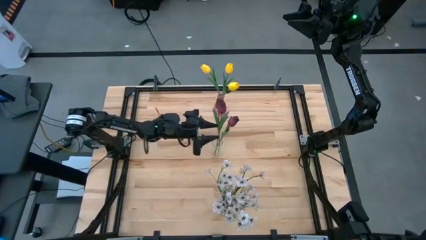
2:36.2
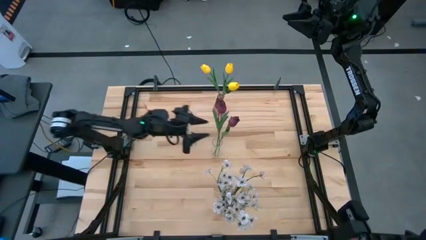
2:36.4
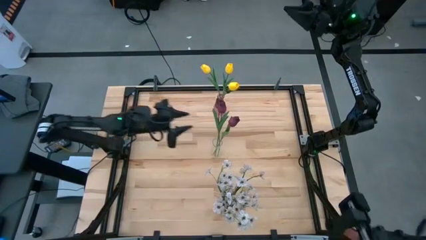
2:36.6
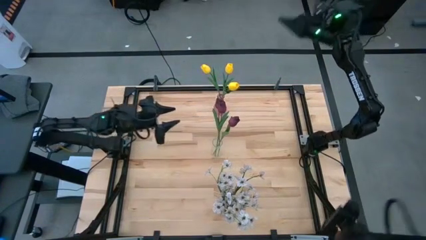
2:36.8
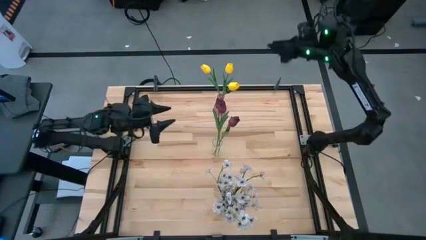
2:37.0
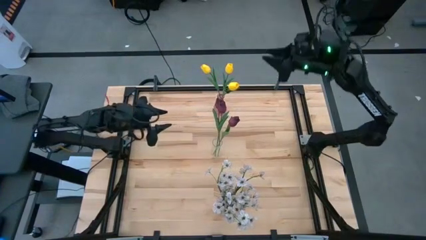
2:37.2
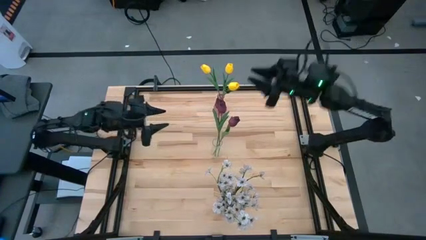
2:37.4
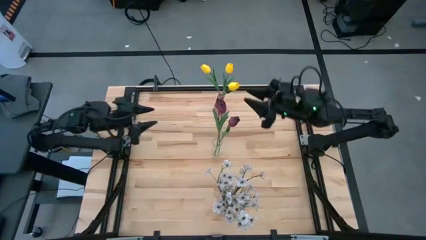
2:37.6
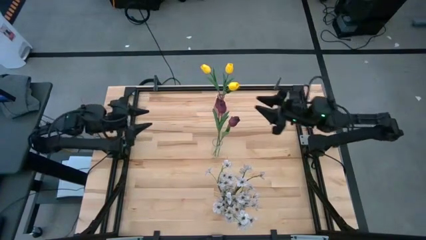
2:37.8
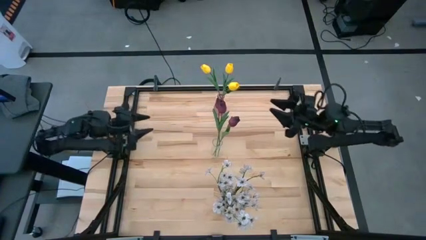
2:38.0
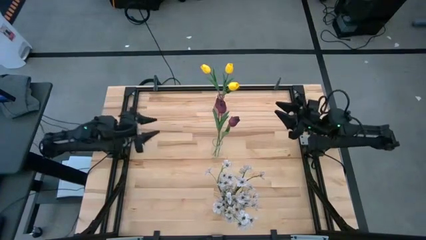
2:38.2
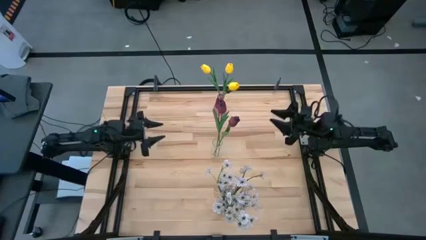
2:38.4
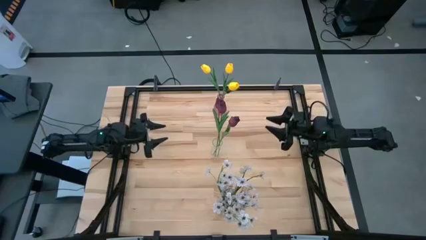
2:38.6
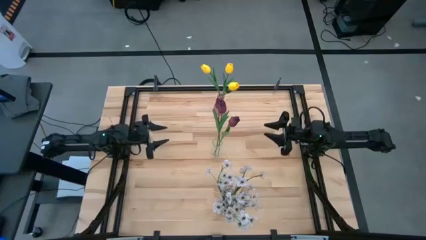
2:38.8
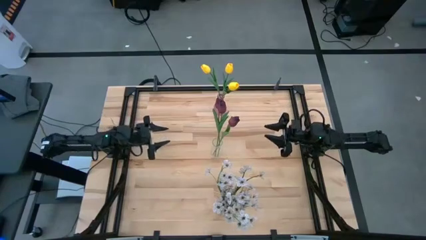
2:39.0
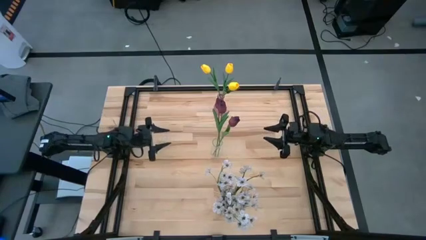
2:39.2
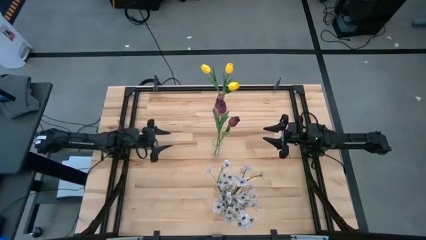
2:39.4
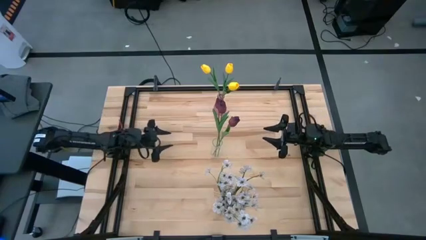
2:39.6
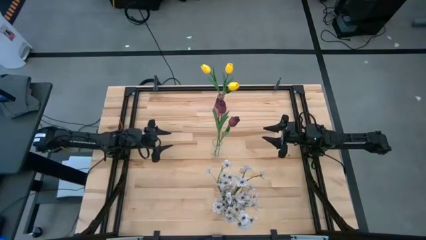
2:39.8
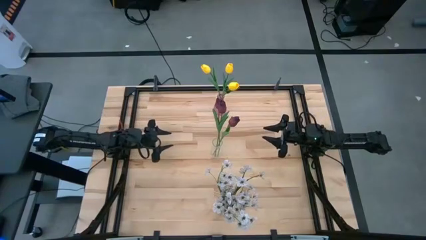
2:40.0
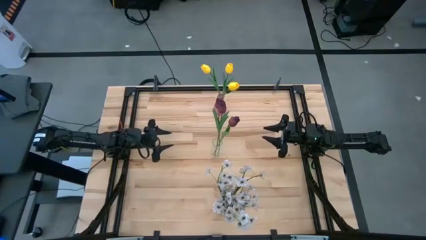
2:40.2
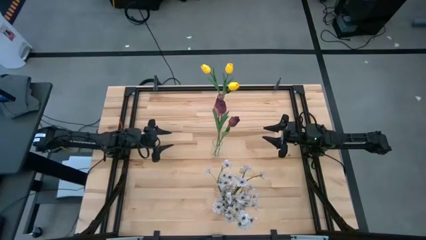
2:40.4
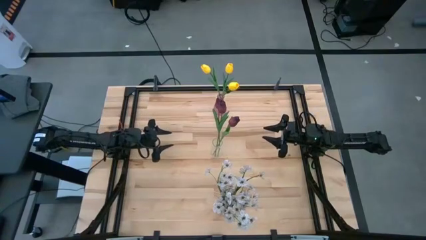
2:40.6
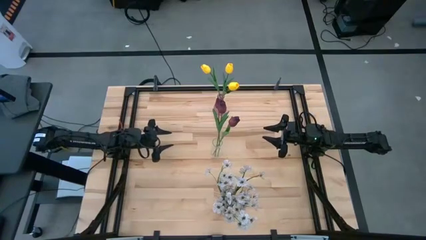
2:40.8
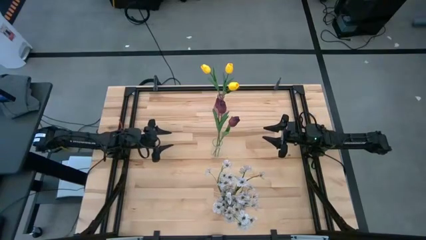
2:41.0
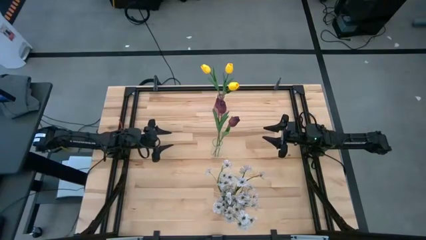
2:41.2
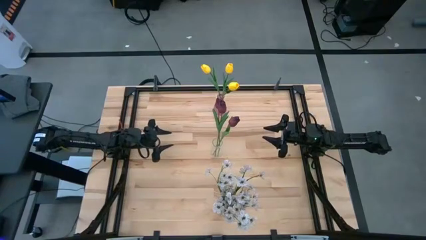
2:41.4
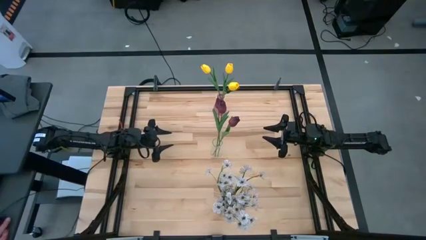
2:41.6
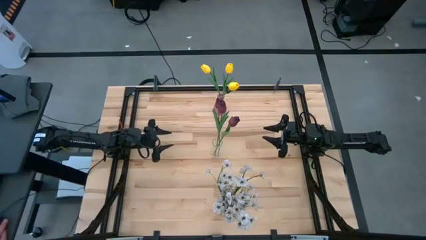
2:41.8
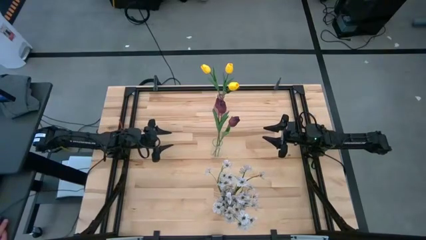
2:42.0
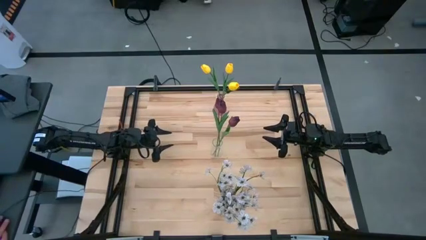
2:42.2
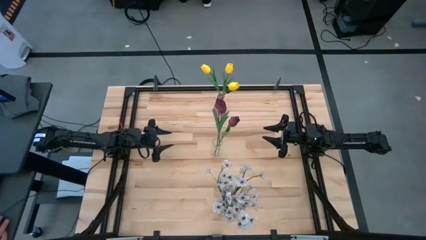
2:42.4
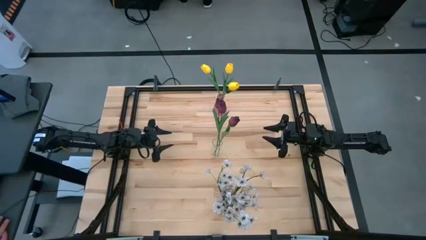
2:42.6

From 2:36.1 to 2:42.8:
Task: Sort flowers into vase by color
Return to Home Position

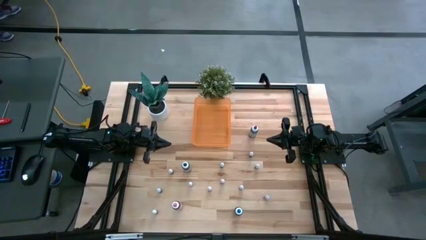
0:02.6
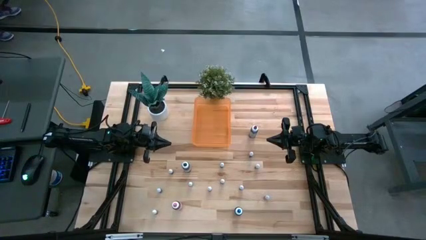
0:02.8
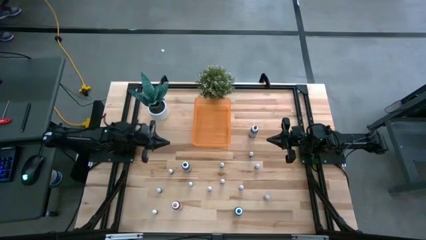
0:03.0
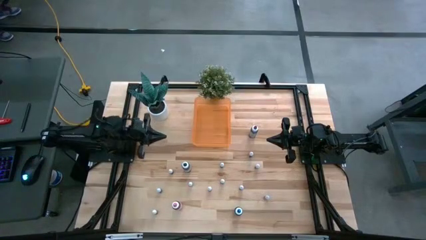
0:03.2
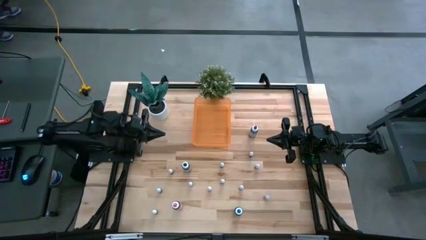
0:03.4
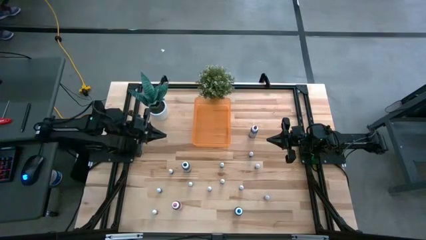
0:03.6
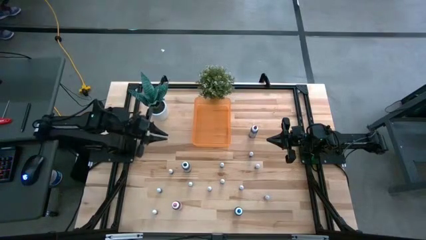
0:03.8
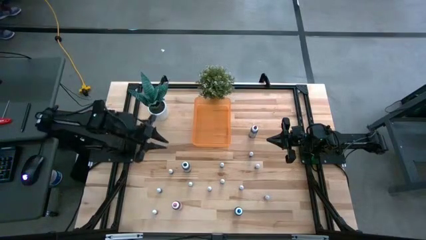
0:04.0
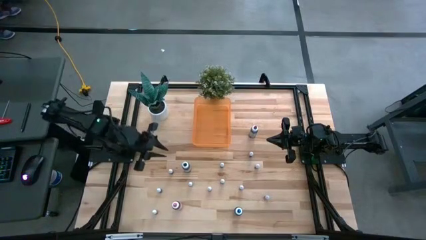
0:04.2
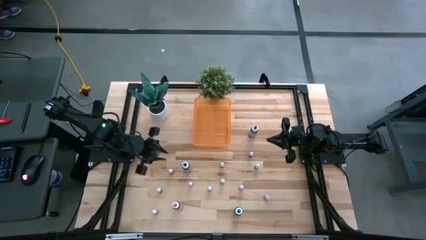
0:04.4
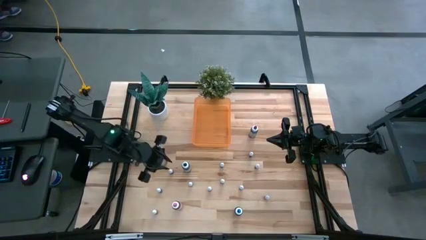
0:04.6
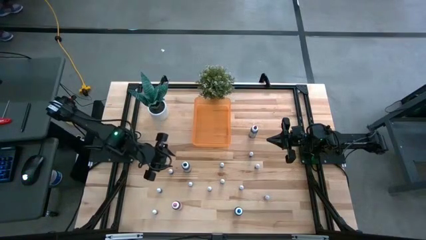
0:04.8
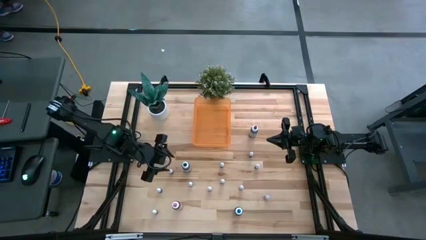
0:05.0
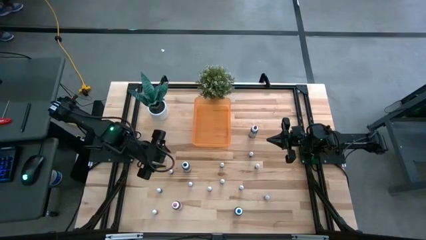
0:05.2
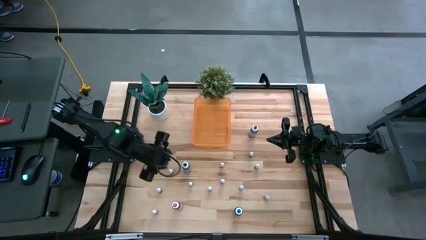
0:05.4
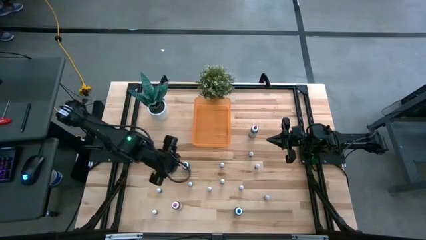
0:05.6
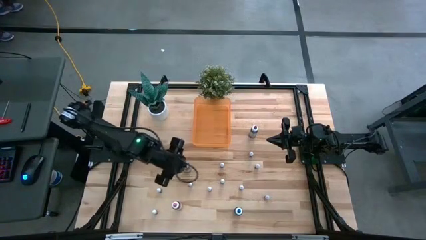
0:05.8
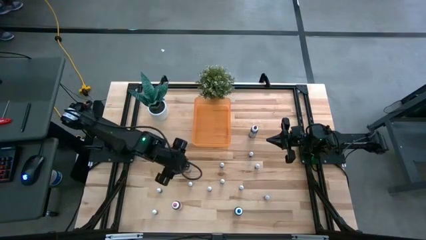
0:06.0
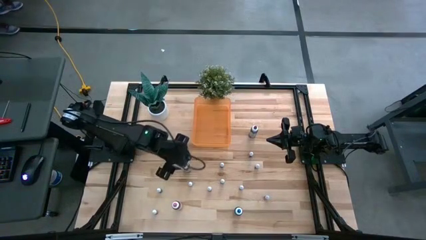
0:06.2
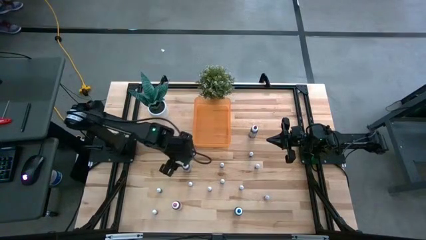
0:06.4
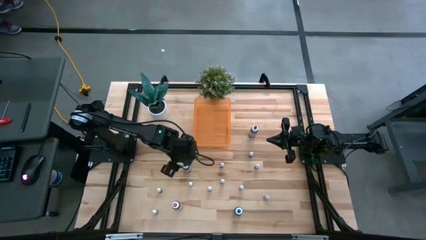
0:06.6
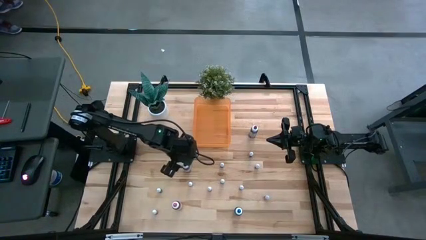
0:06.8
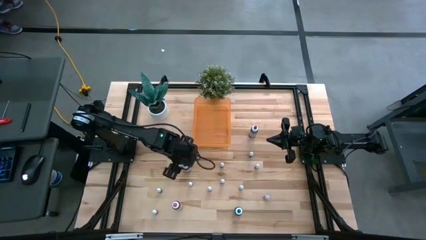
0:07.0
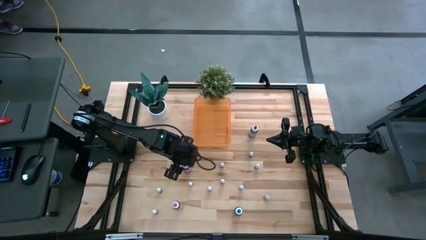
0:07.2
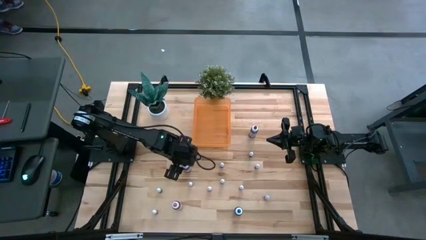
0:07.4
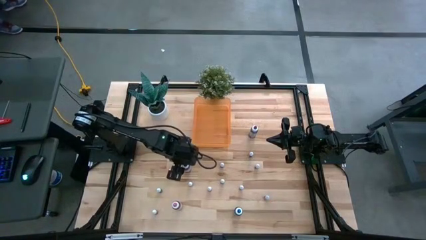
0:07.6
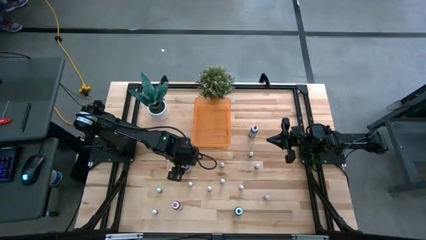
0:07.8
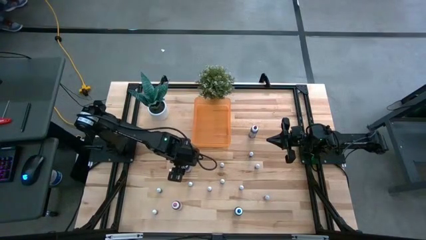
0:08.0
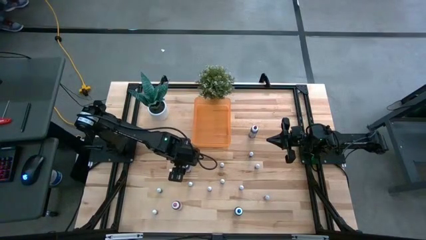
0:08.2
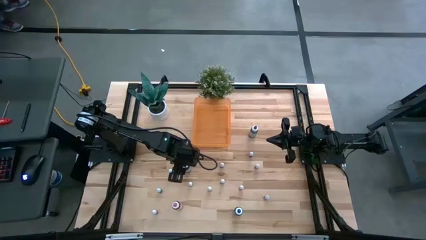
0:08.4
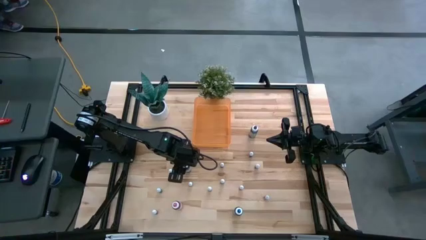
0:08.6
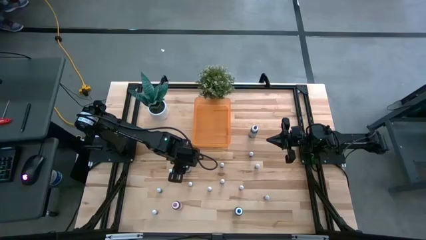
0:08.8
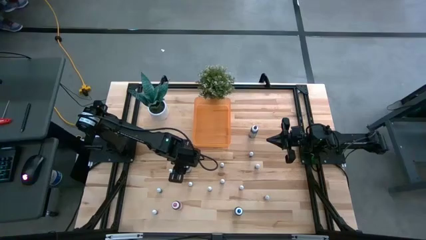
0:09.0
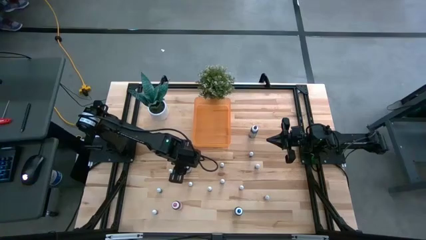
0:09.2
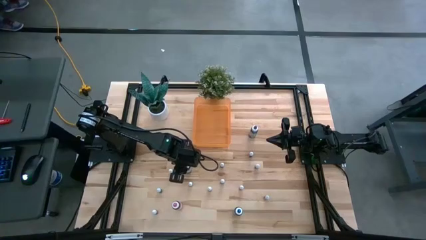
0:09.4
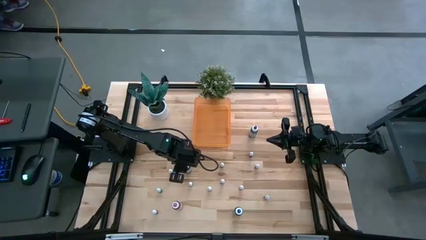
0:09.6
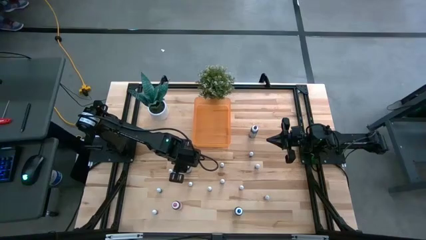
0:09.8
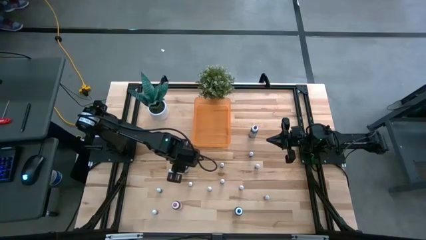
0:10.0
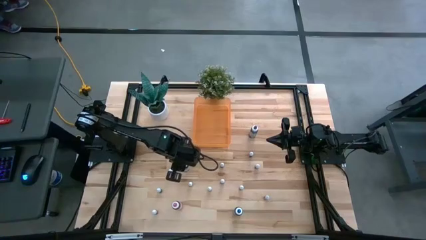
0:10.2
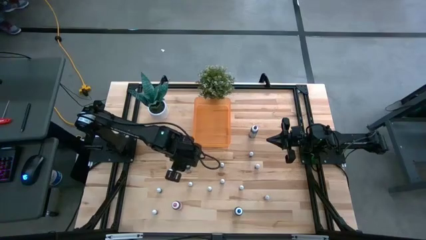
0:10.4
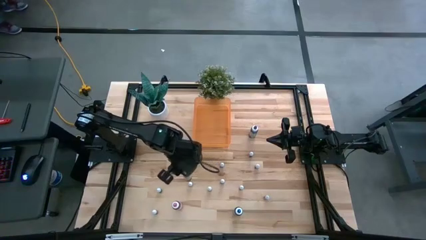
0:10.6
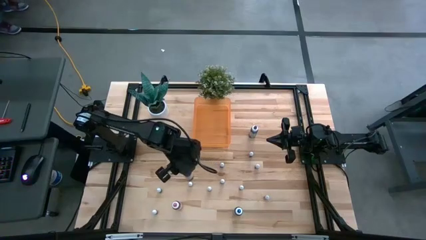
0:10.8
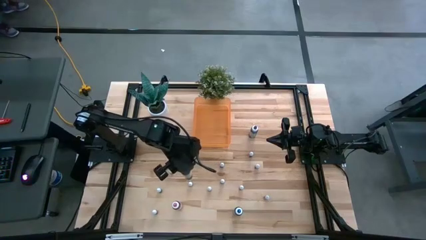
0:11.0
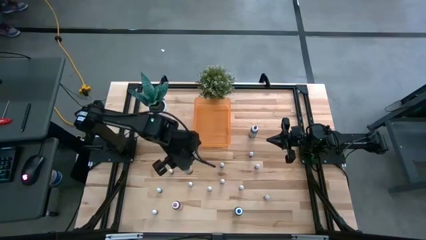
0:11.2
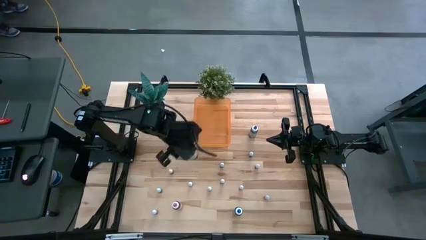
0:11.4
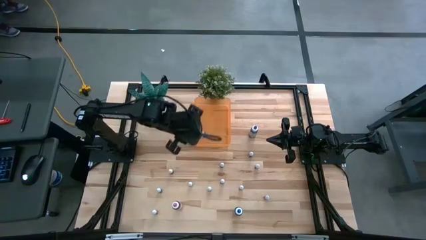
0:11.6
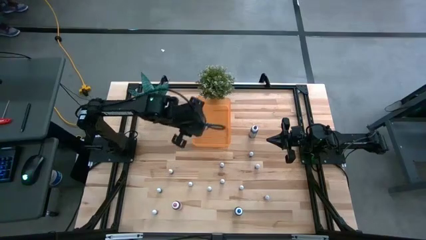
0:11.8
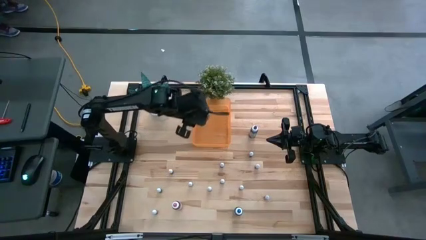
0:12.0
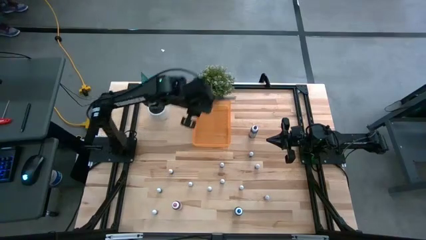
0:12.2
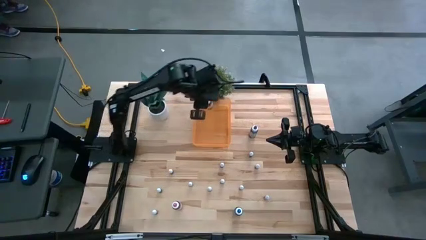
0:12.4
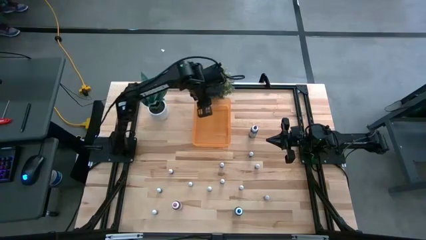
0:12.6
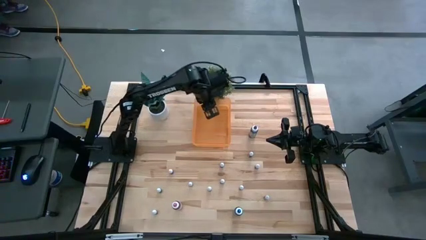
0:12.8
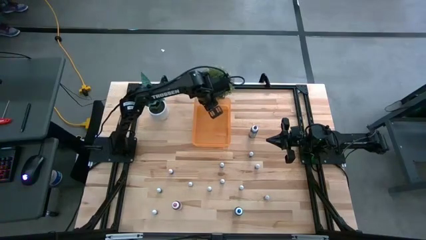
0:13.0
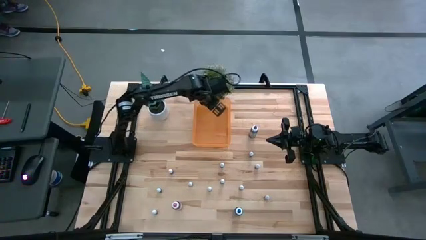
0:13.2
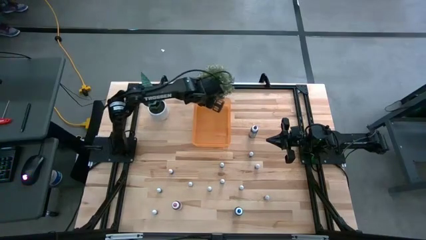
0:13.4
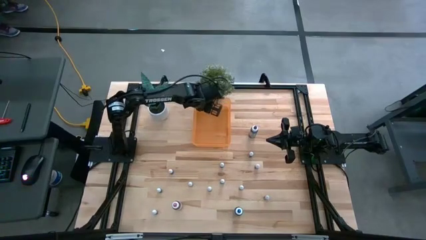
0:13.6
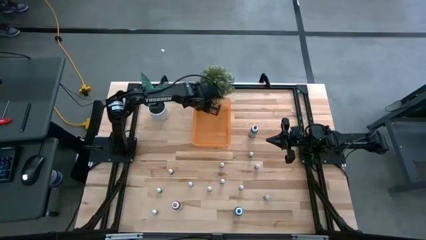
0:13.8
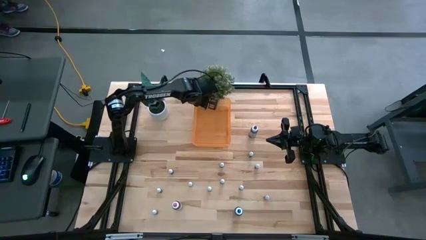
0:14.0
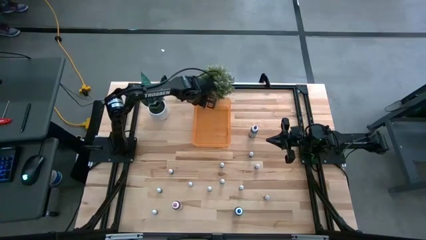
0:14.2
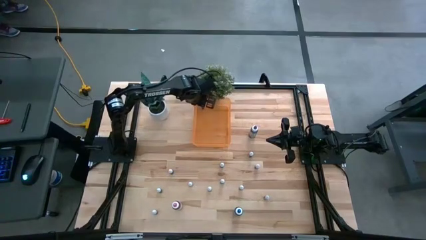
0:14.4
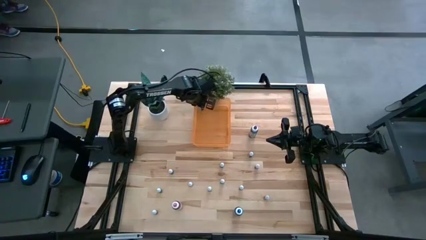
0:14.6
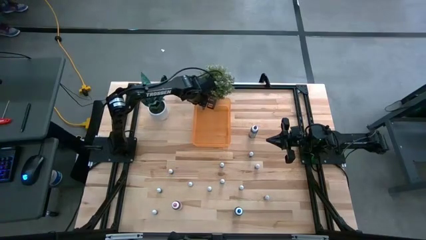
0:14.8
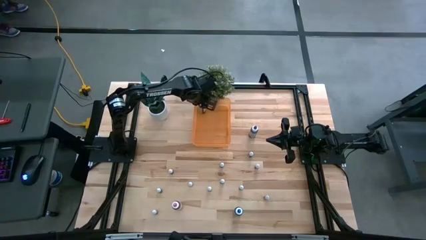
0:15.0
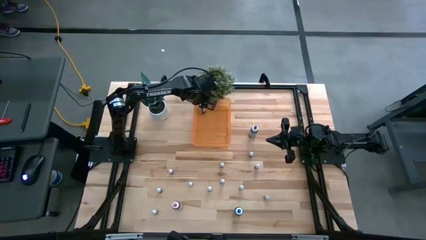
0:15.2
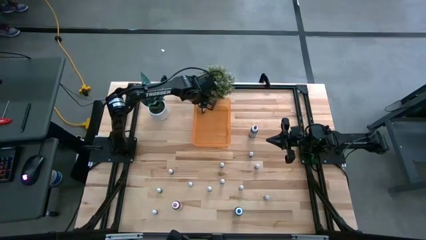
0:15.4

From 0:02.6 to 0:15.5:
Task: Pick & Place food coloring
Put the large black food coloring bottle into the orange bin
